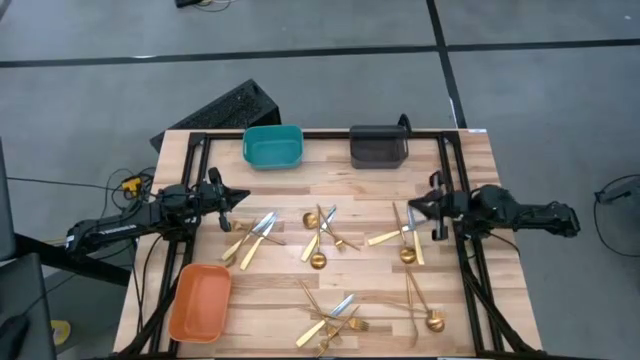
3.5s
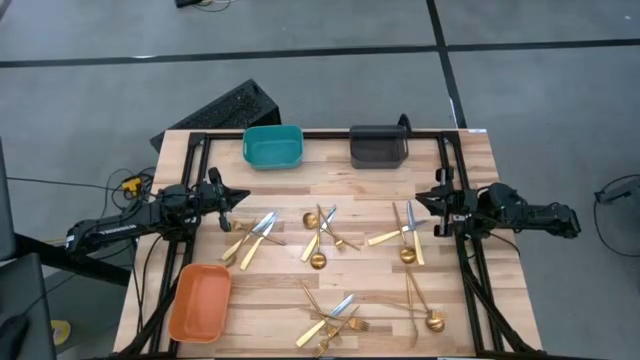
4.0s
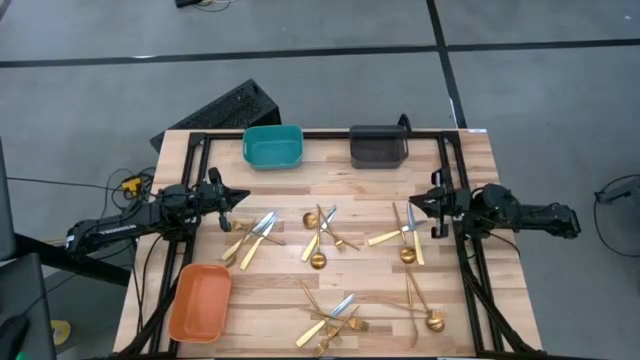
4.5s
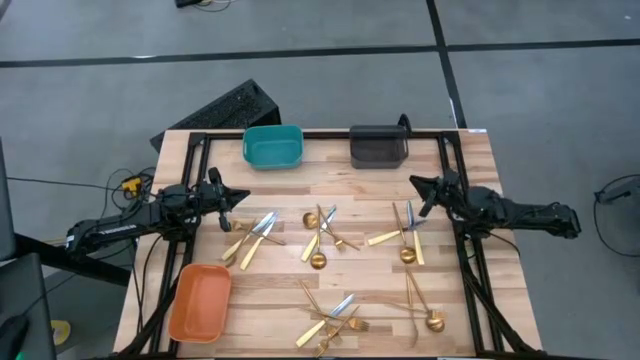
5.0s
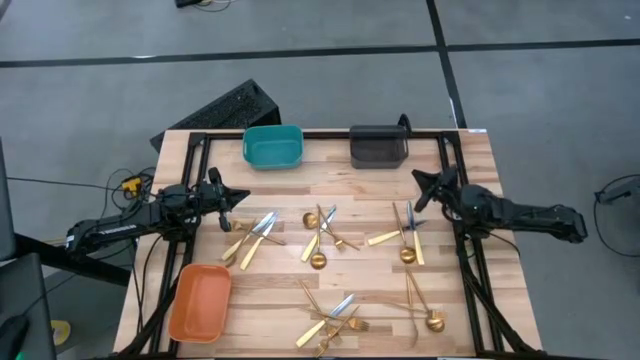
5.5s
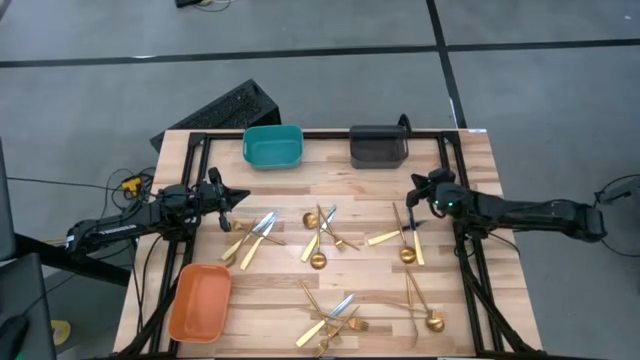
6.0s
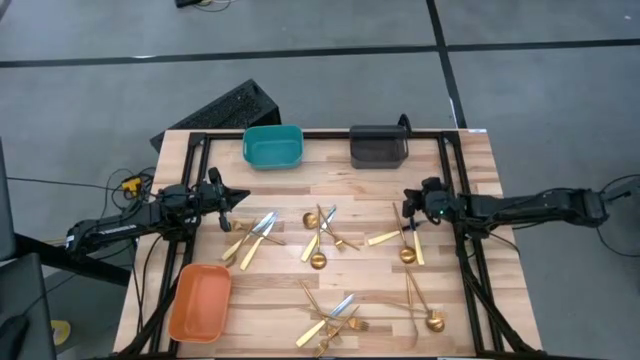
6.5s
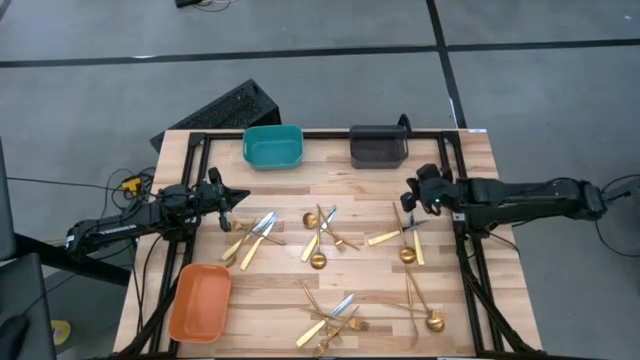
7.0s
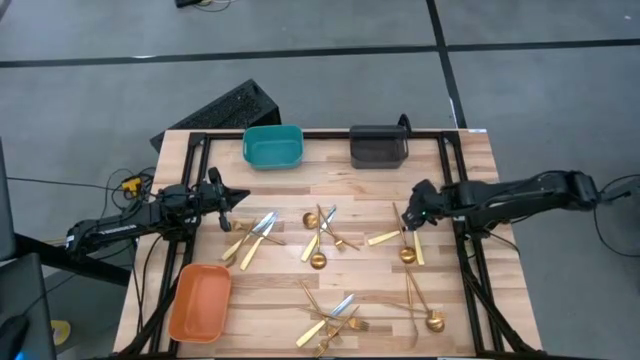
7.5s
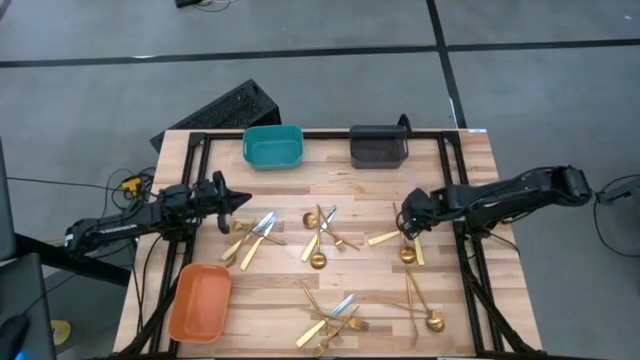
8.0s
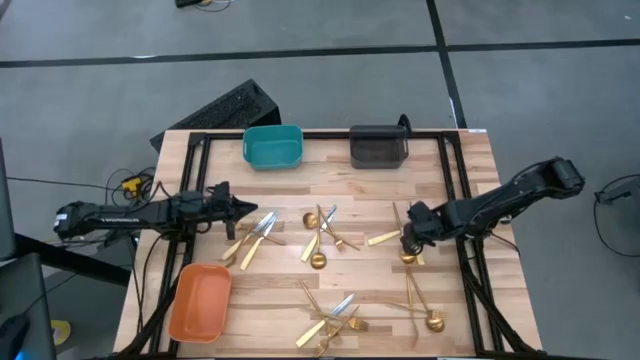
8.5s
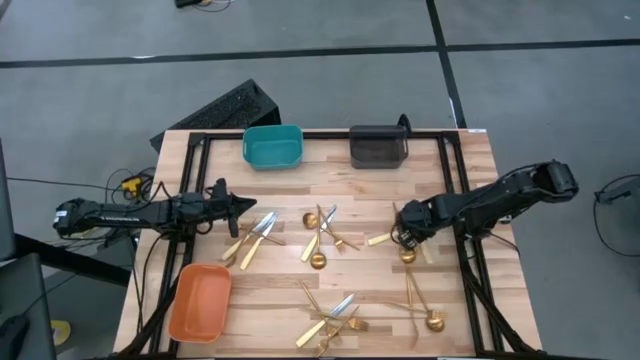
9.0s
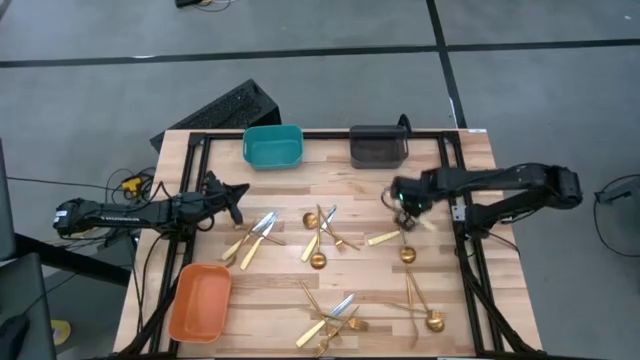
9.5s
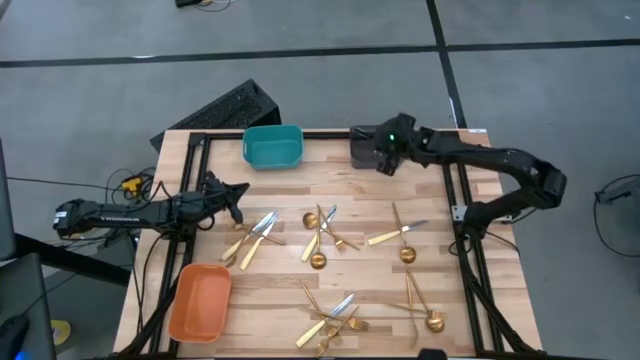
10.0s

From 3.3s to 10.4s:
Task: Sort silverware by color (type)
Put the yellow knife into the black bin

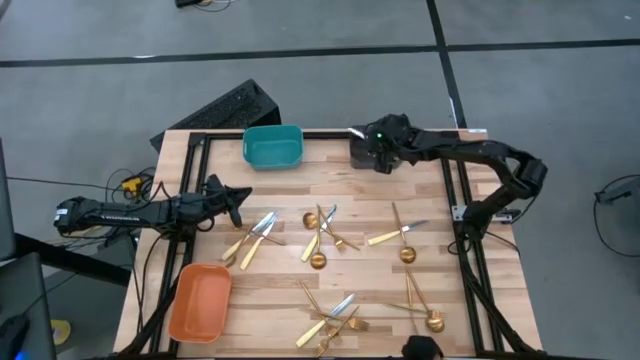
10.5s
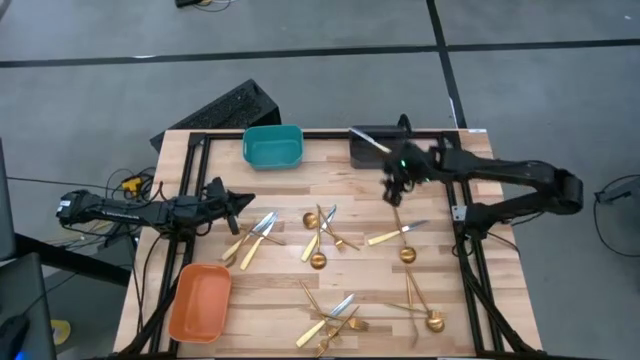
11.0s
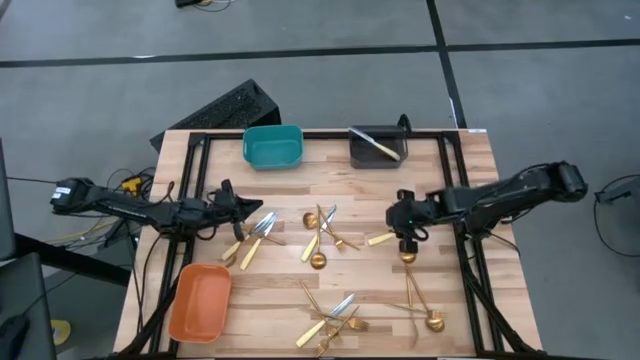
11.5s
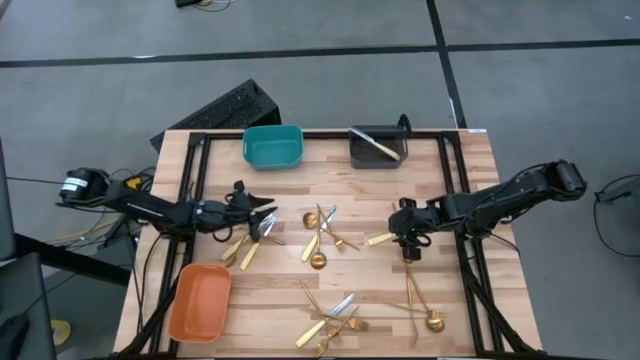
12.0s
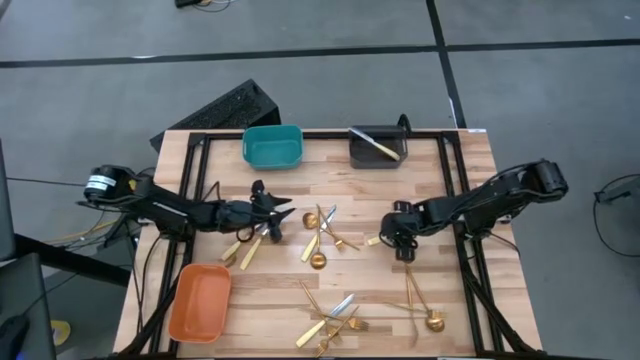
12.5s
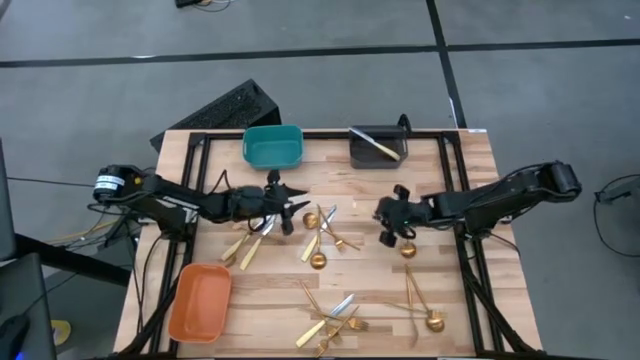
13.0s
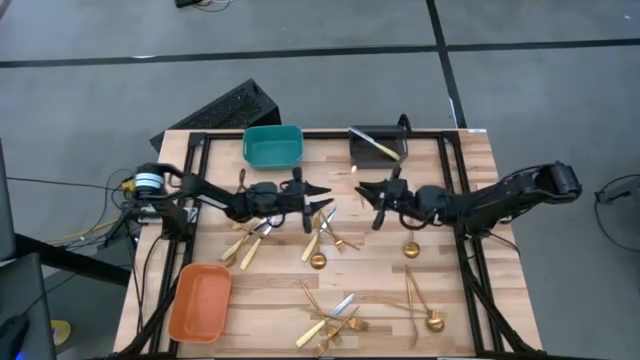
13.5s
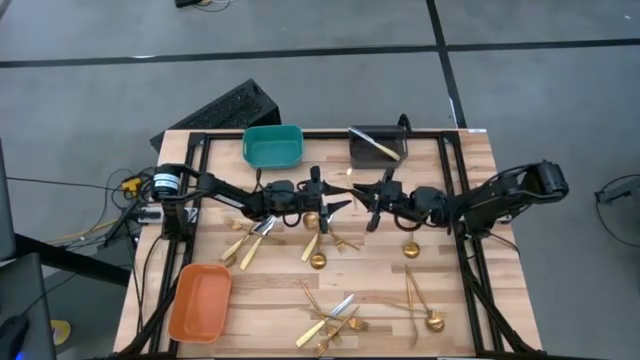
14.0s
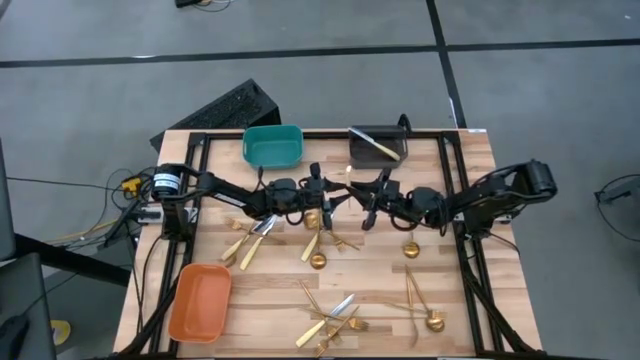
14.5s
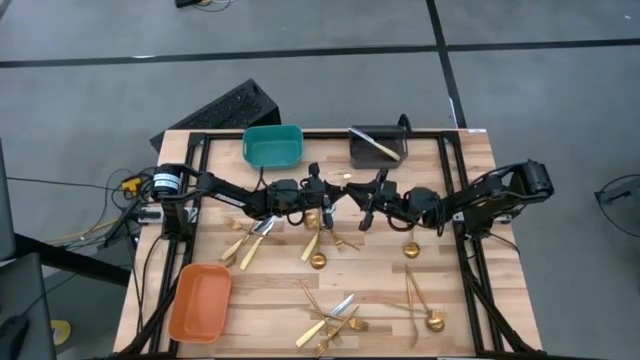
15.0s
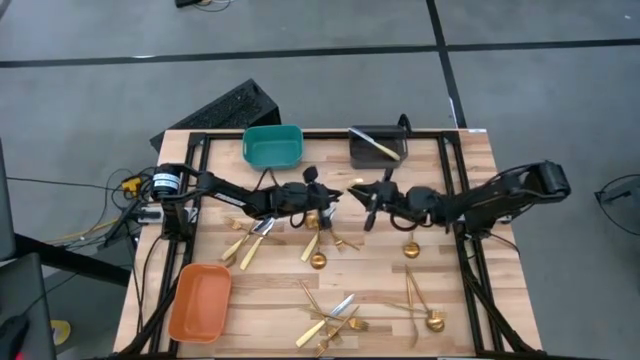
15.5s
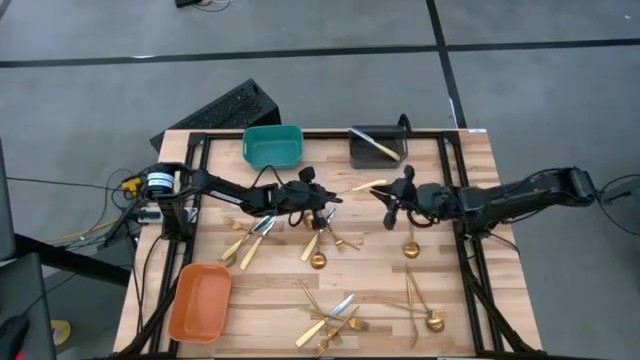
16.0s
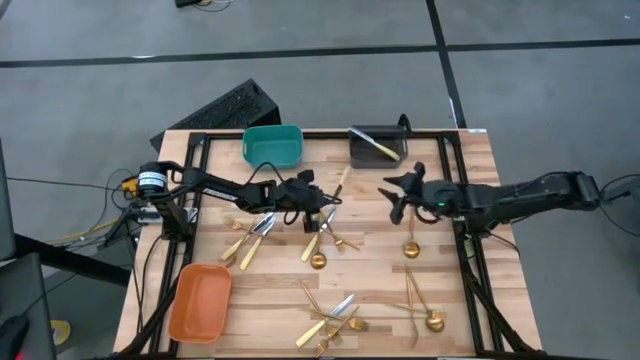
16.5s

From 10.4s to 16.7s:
Put the yellow knife into the black bin

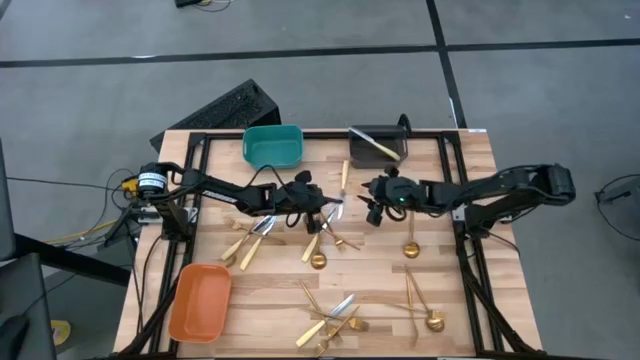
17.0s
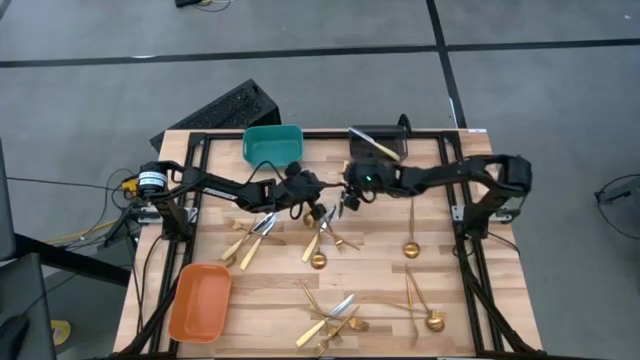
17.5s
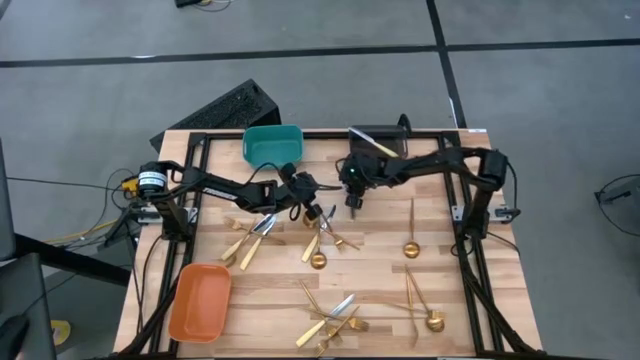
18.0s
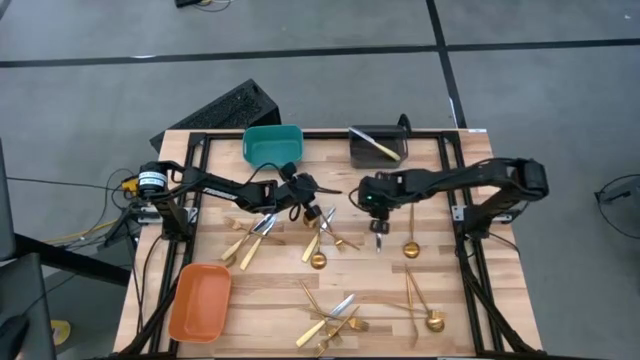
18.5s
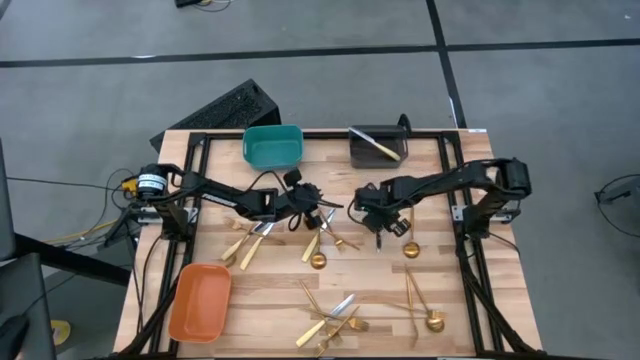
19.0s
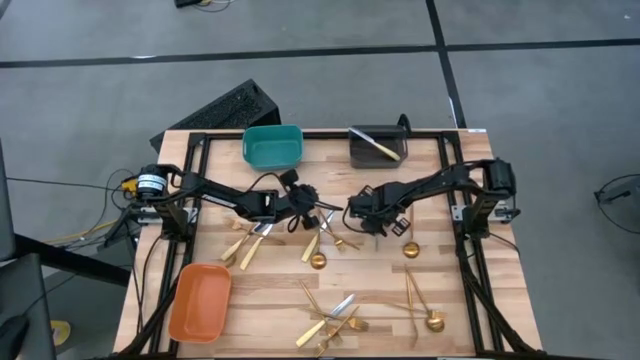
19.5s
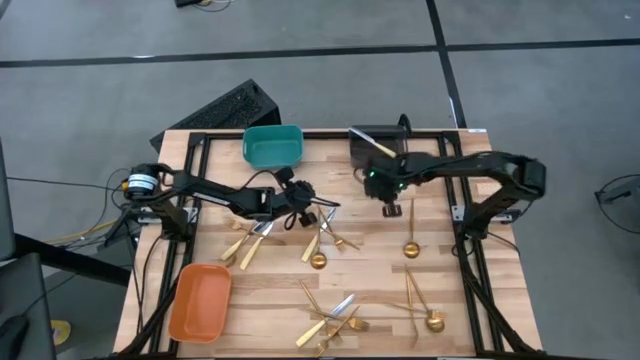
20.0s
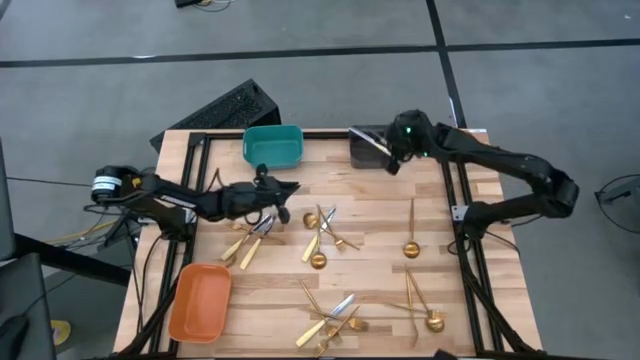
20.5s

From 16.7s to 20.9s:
Put the yellow knife into the black bin

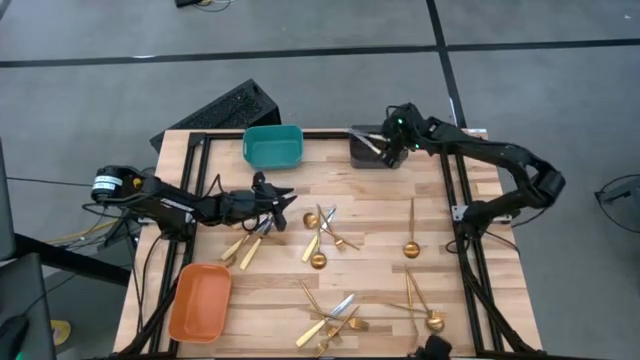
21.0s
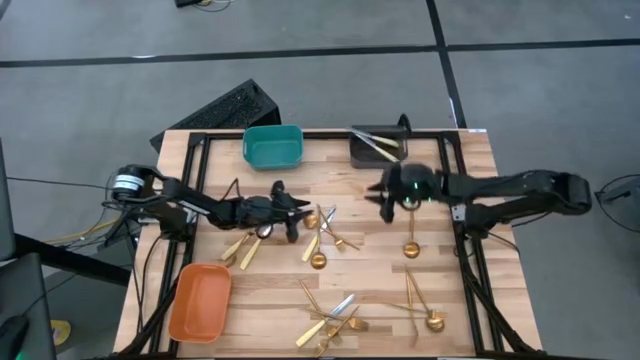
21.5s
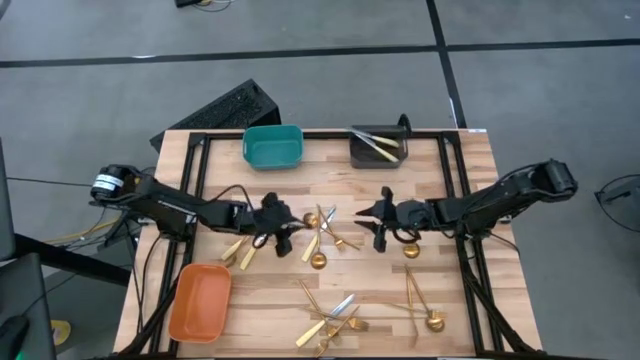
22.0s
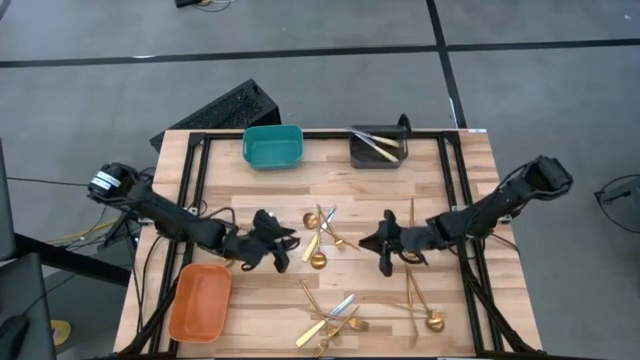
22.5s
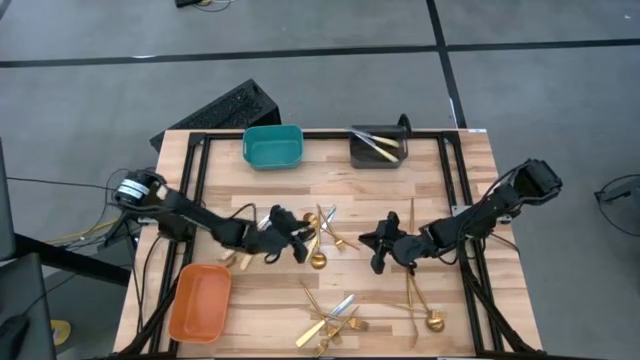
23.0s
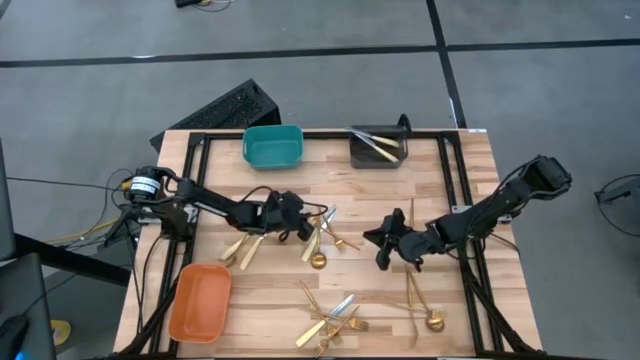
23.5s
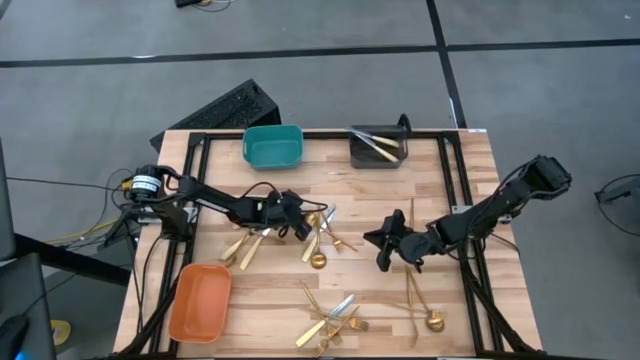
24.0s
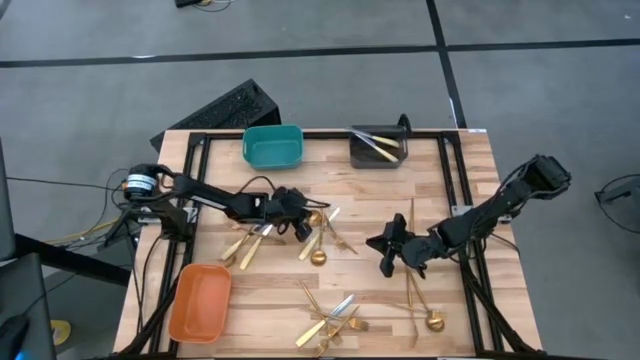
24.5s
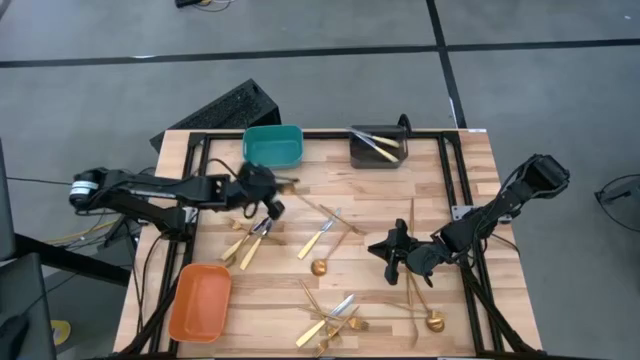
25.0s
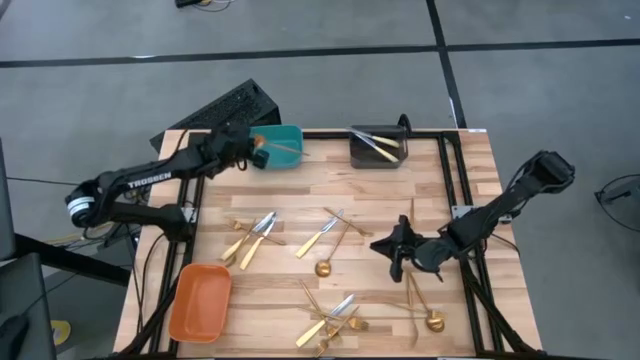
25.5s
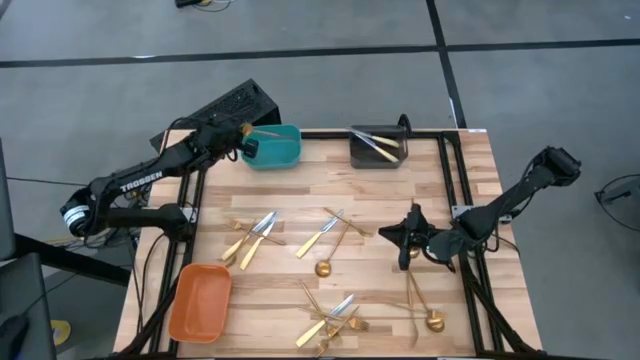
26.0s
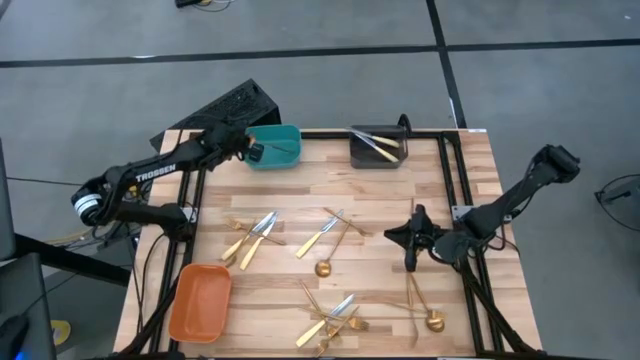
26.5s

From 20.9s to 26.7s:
Put the gold spoon into the green bin
